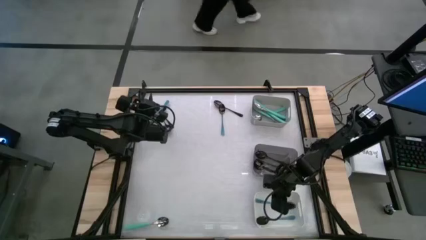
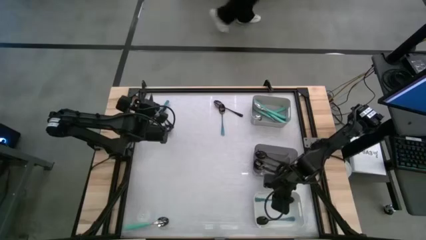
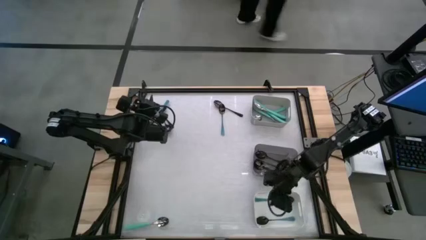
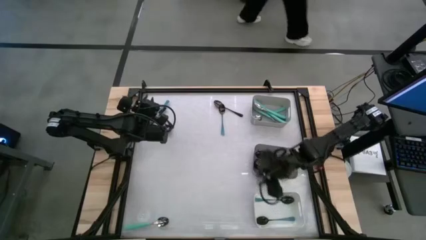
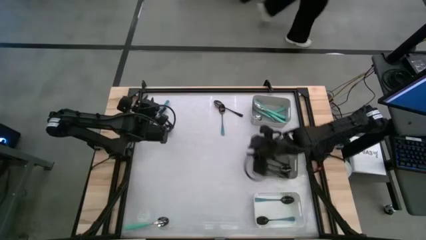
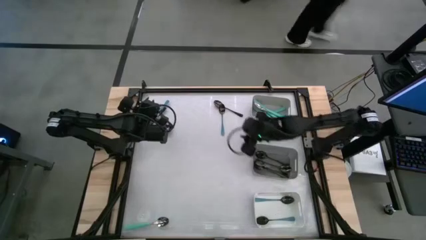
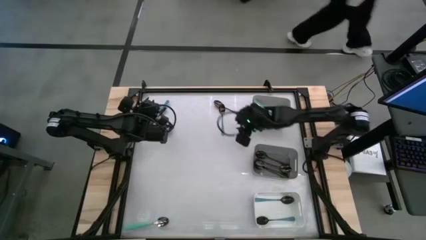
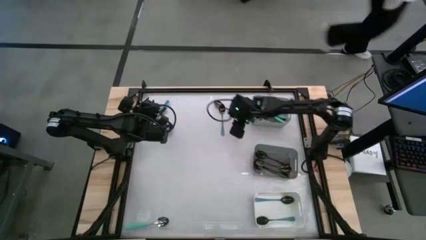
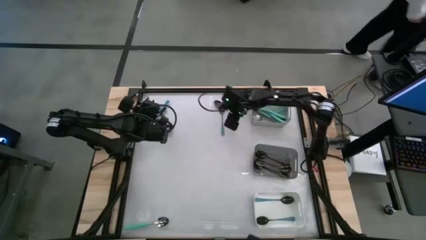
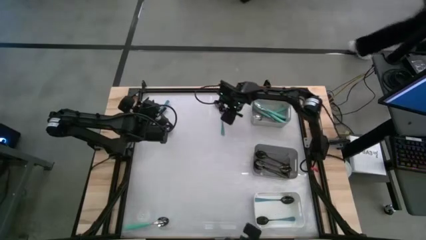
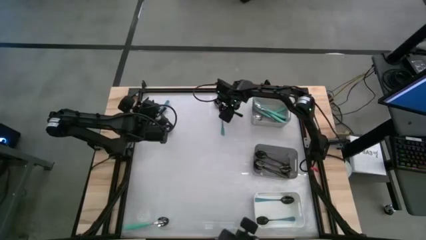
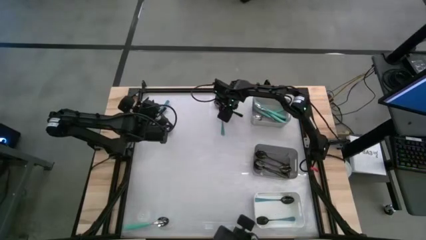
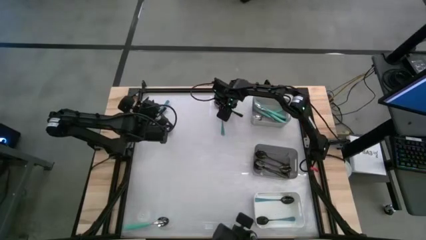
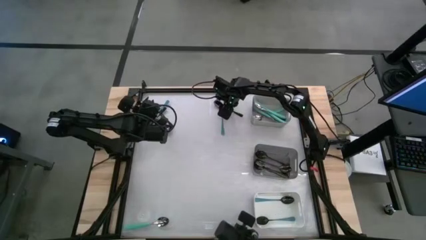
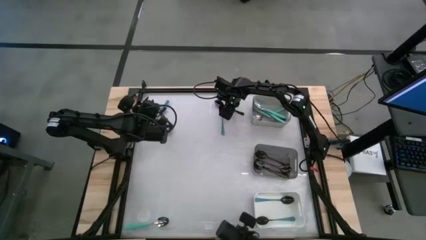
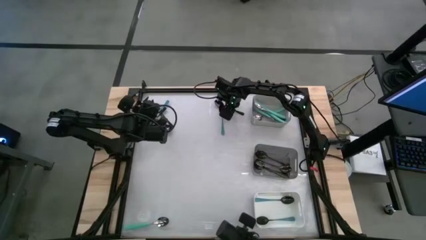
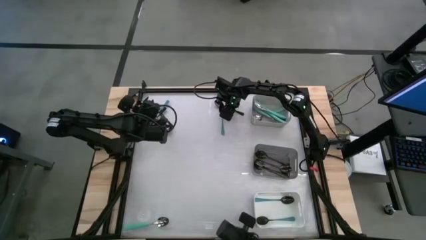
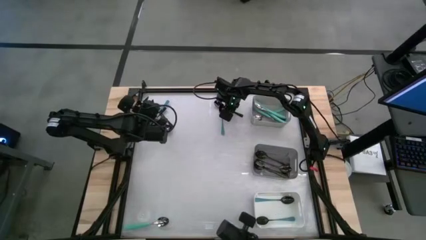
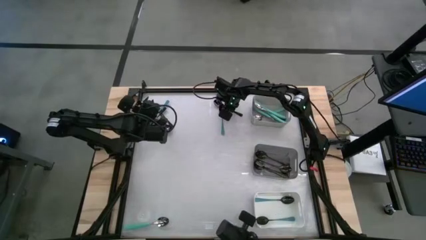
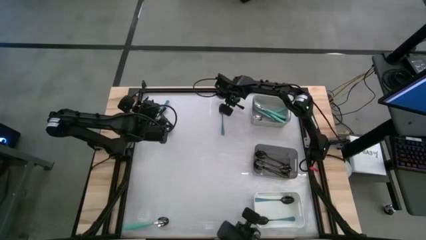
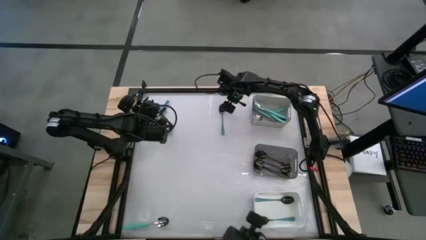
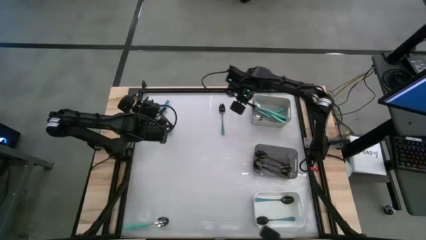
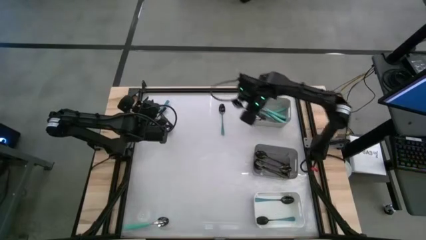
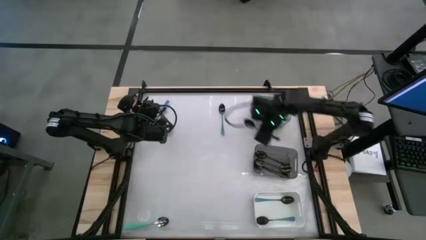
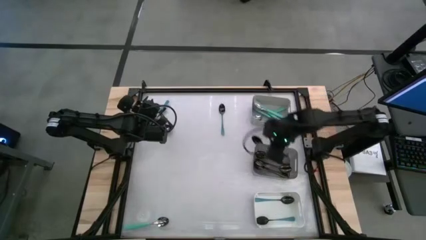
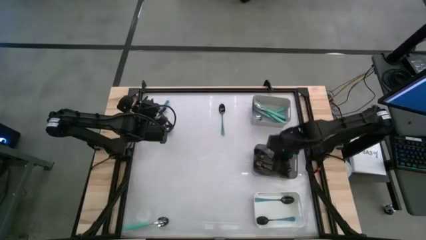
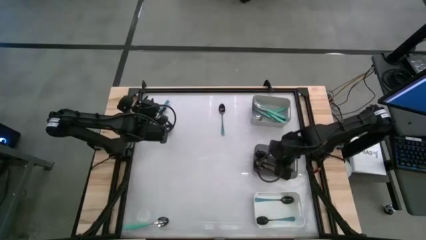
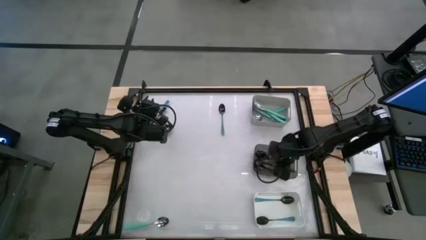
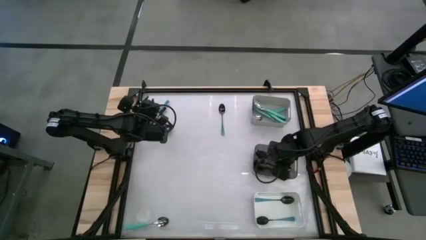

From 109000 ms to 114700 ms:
Task: Sort silverware by color (type)
Put the black spoon into the black bin

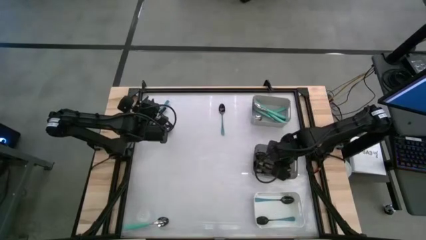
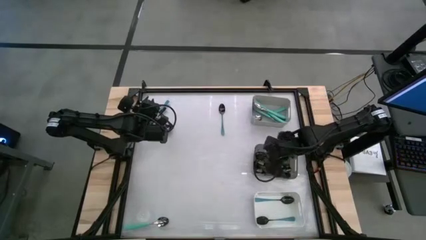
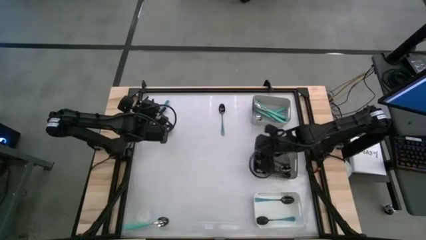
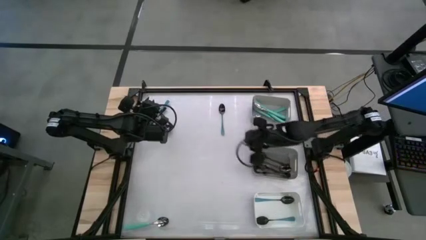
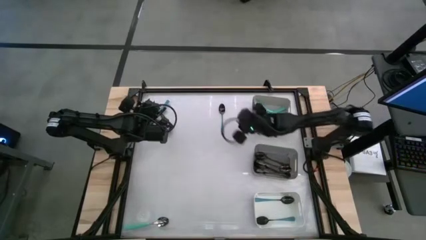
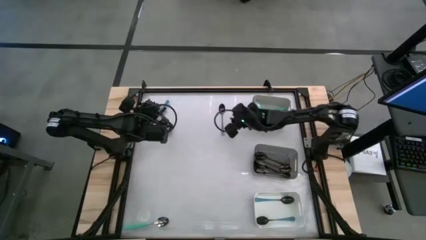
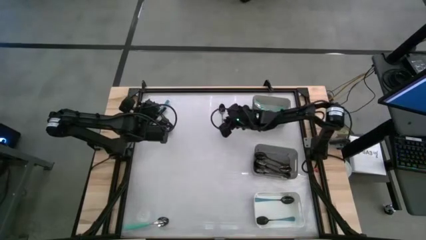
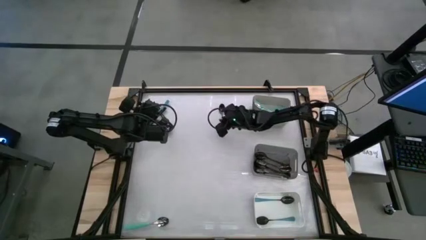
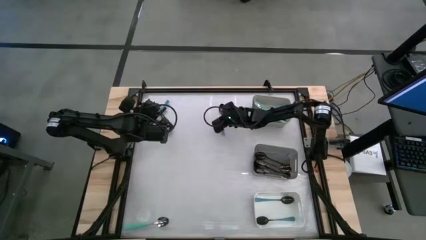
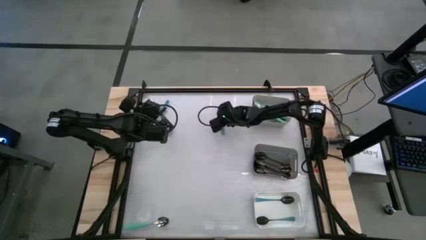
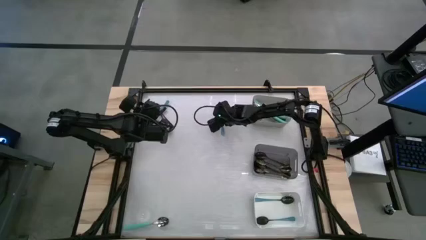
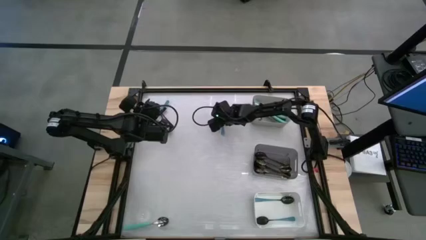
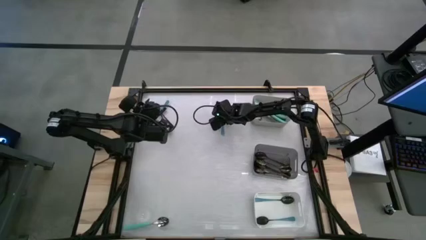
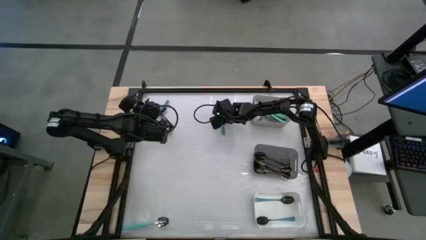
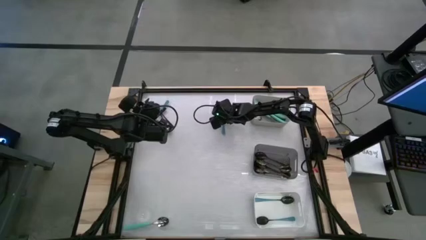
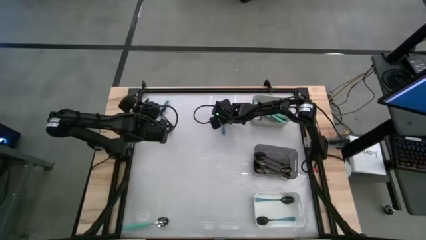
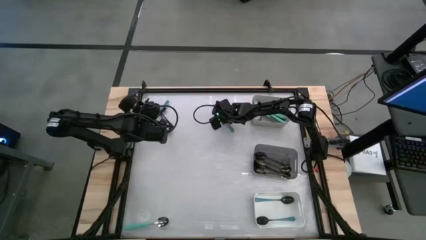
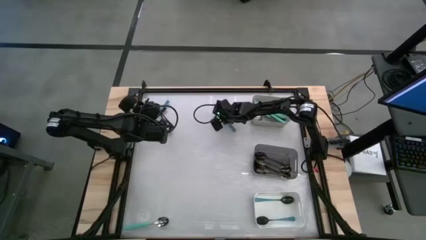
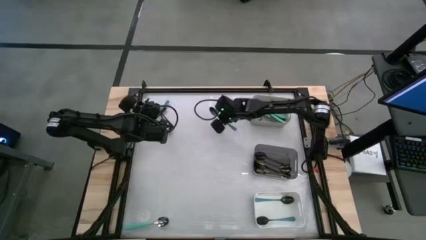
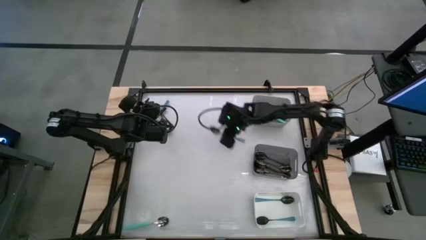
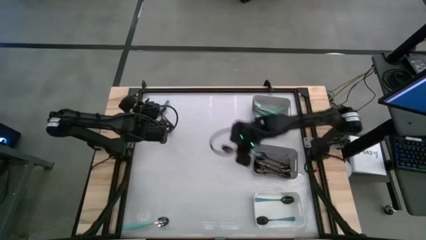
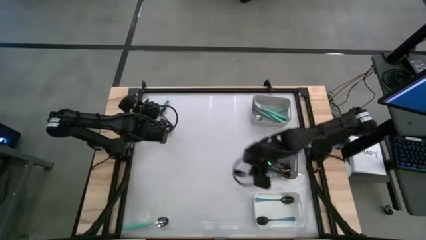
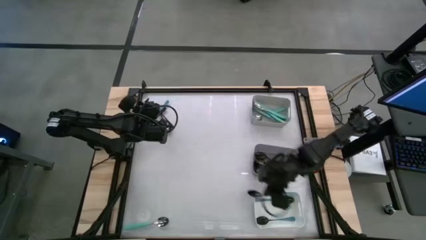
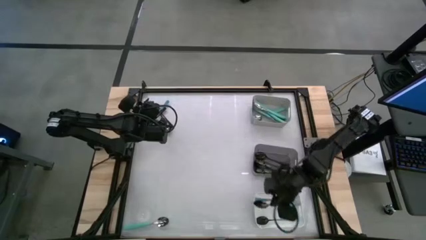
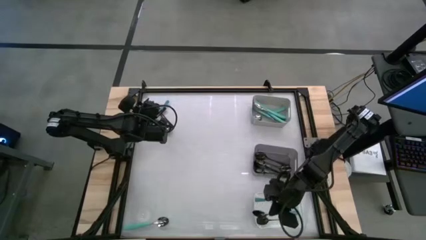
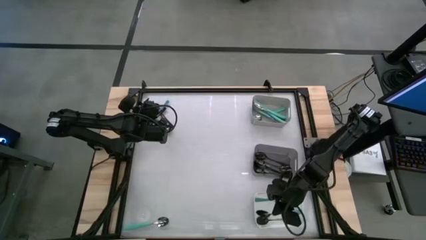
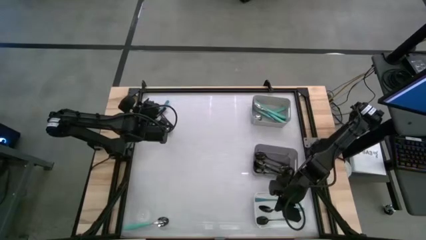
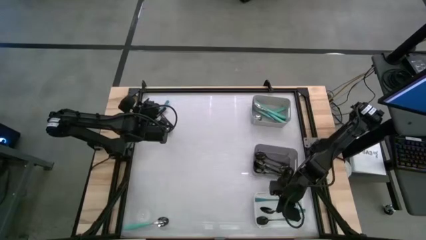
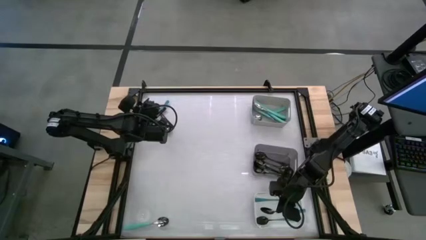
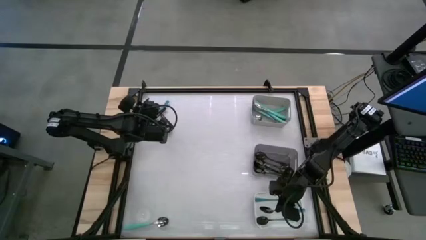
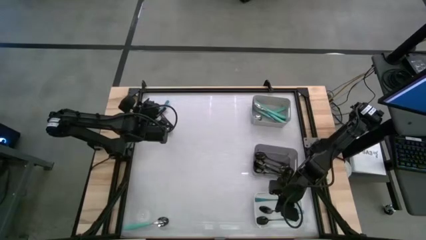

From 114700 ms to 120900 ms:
Put the blue spoon into the white bin

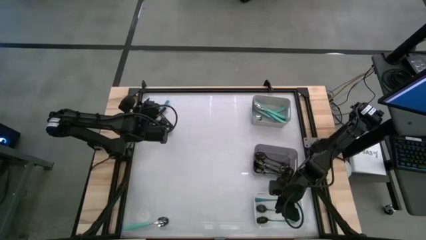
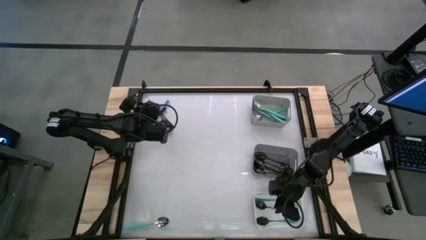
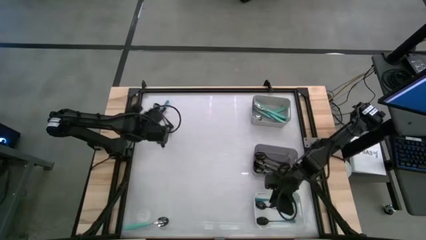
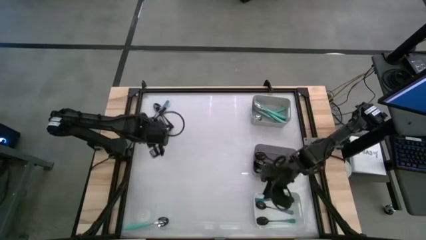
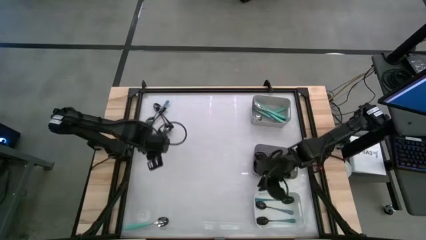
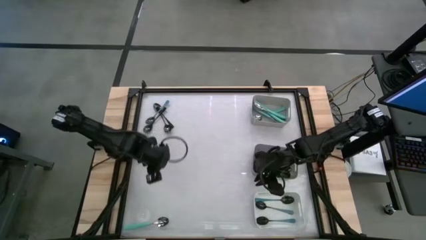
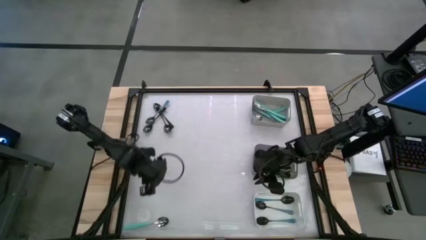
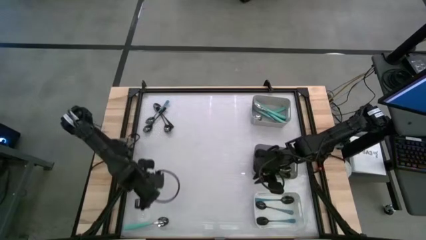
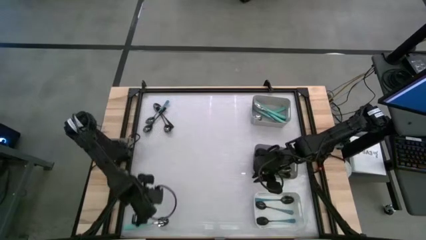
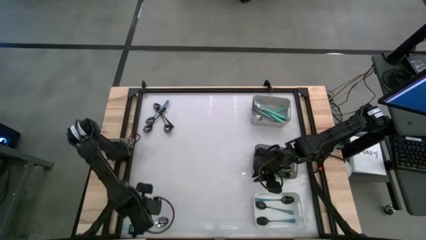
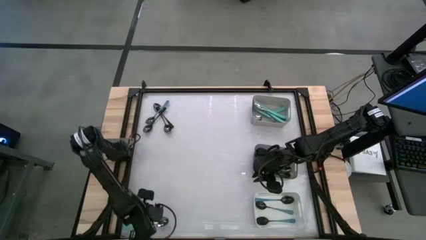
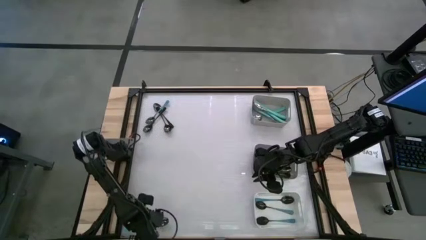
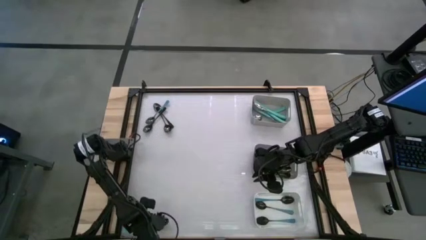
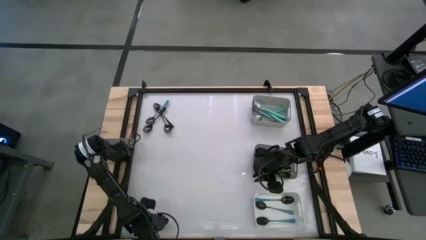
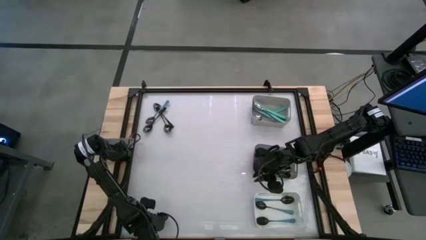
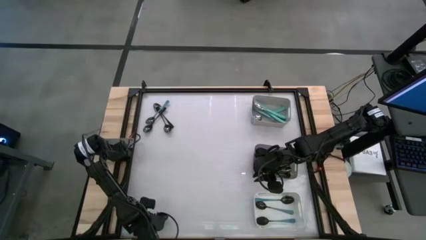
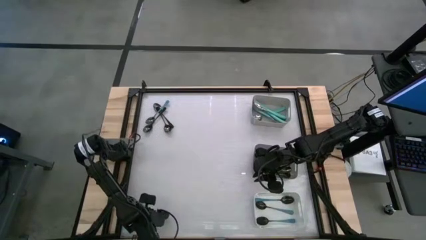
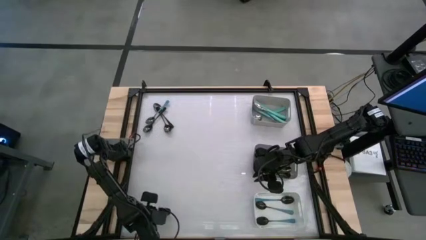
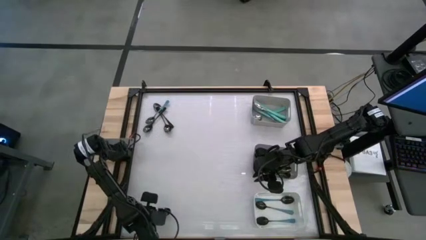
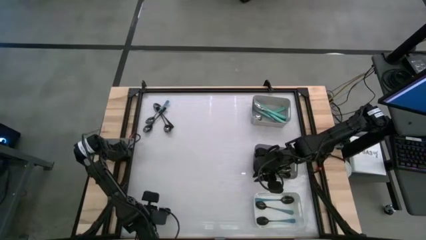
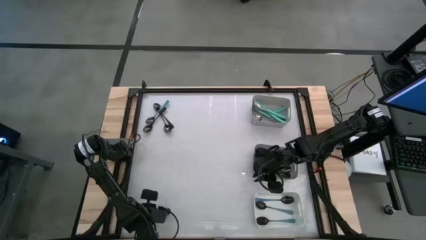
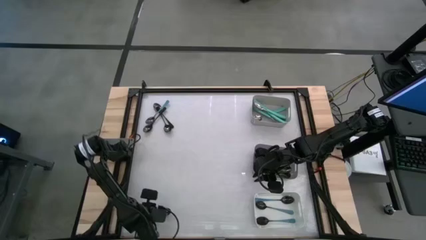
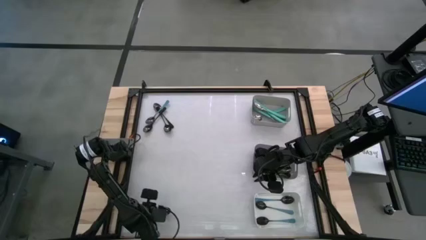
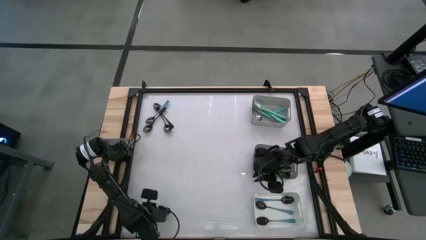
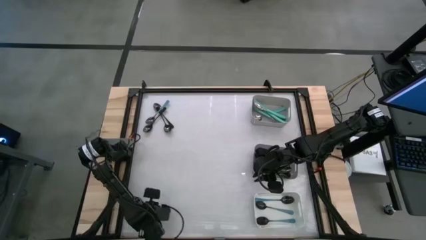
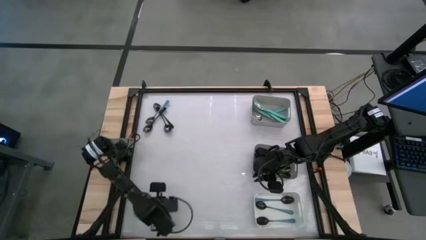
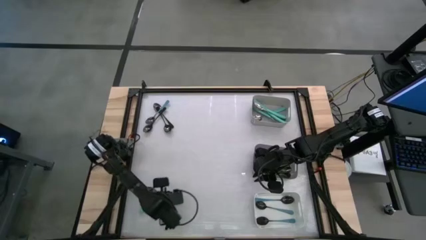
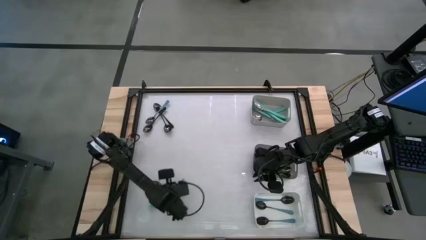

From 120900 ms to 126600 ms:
Put the light blue spoon into the gray bin
